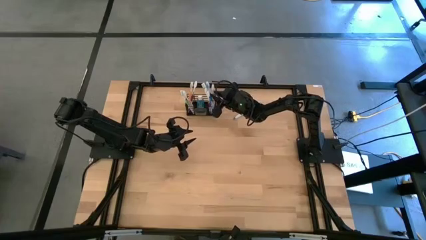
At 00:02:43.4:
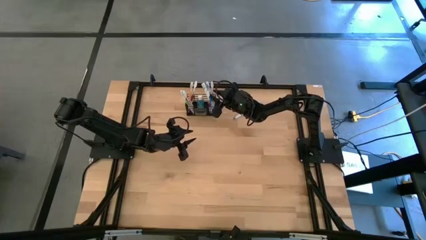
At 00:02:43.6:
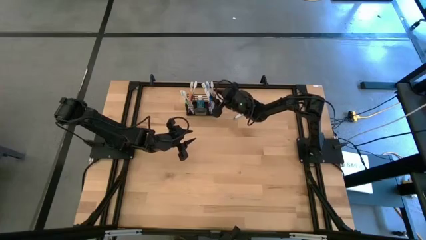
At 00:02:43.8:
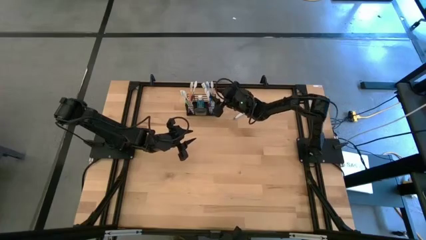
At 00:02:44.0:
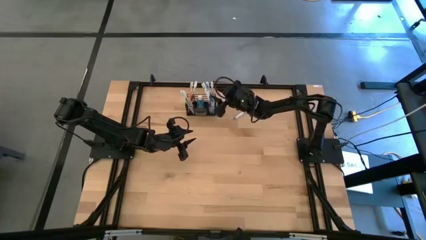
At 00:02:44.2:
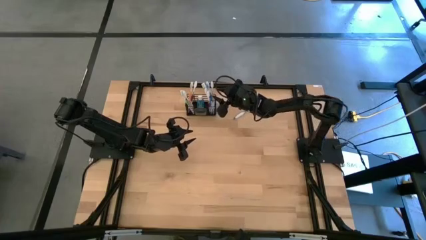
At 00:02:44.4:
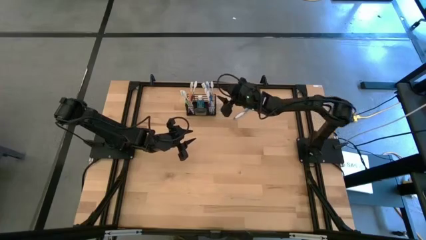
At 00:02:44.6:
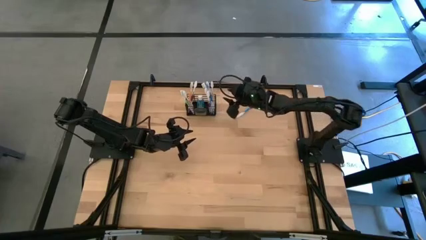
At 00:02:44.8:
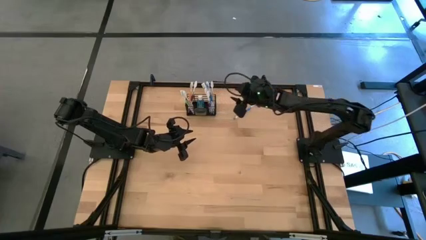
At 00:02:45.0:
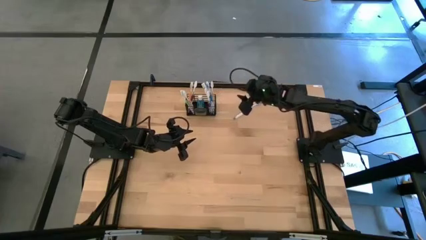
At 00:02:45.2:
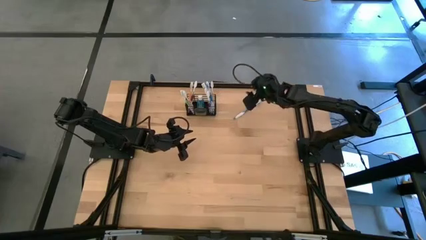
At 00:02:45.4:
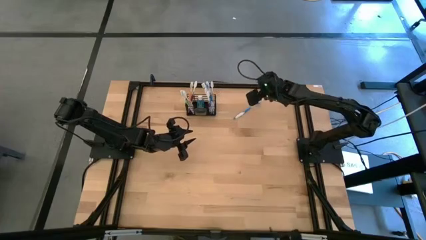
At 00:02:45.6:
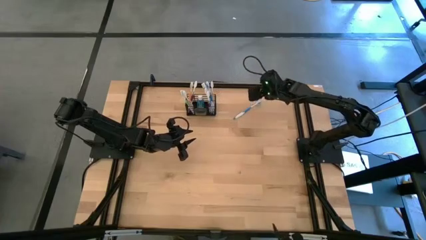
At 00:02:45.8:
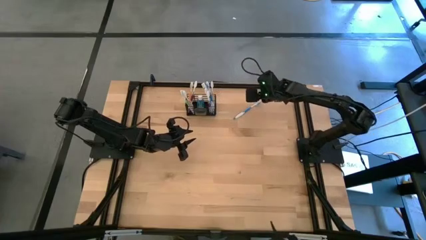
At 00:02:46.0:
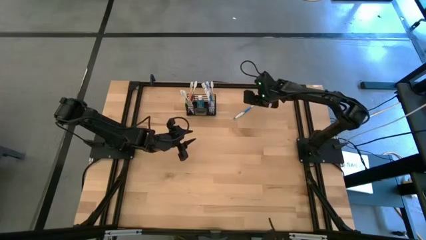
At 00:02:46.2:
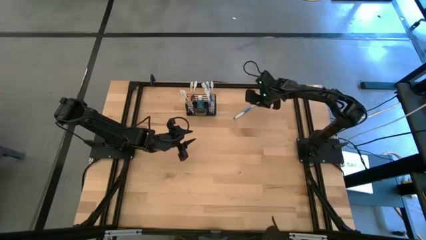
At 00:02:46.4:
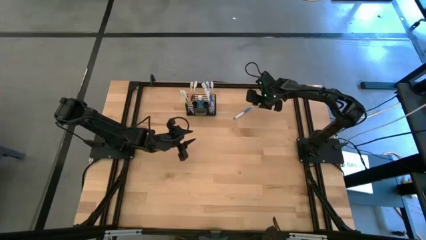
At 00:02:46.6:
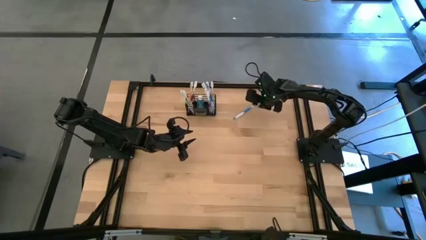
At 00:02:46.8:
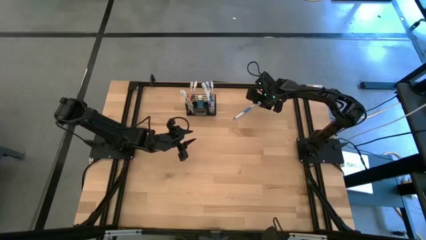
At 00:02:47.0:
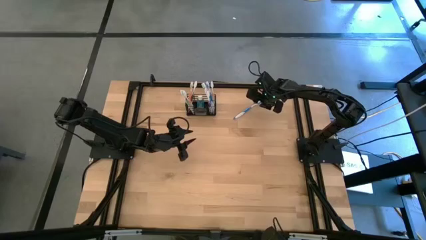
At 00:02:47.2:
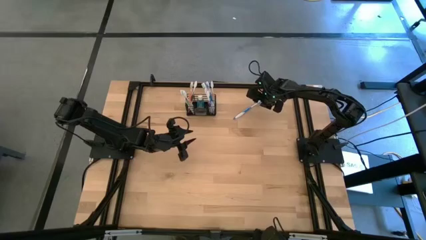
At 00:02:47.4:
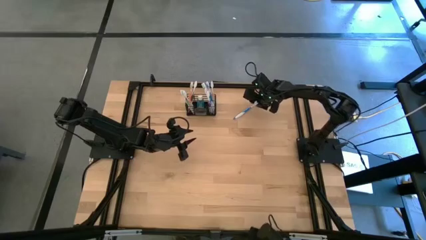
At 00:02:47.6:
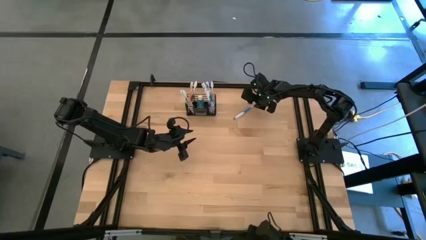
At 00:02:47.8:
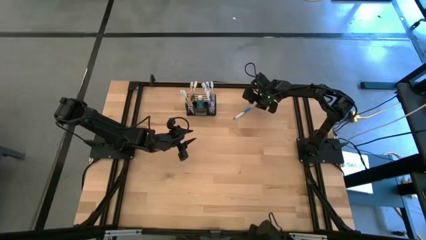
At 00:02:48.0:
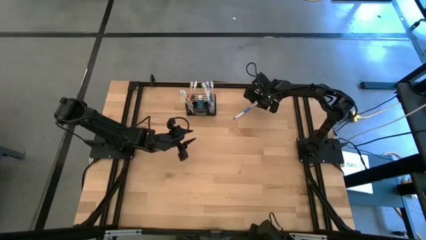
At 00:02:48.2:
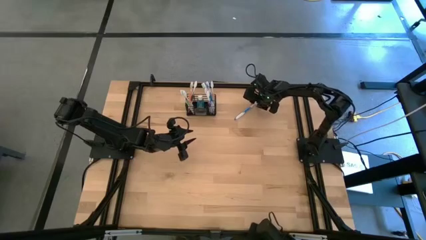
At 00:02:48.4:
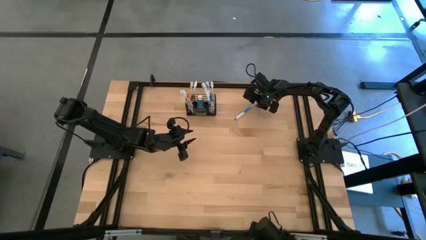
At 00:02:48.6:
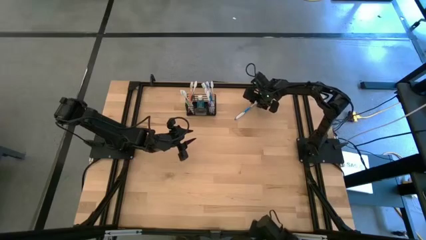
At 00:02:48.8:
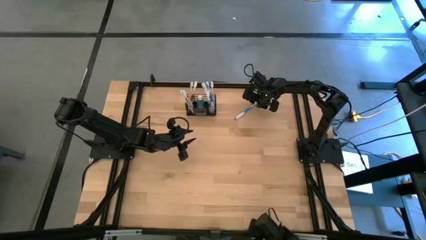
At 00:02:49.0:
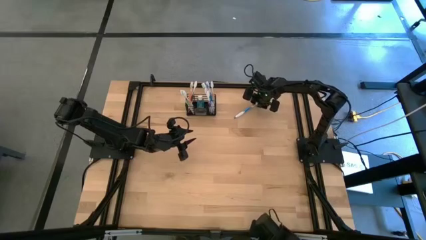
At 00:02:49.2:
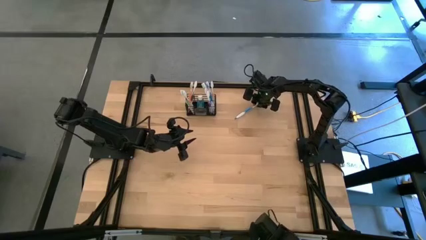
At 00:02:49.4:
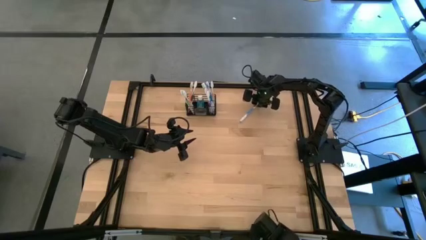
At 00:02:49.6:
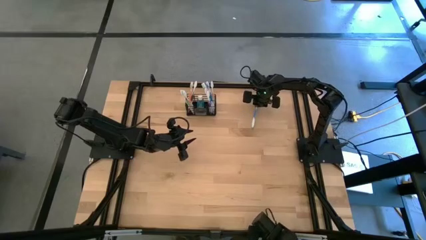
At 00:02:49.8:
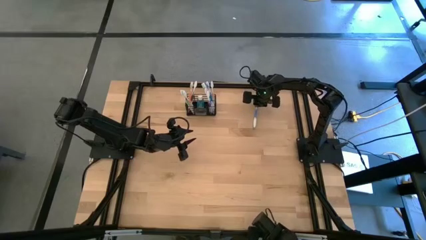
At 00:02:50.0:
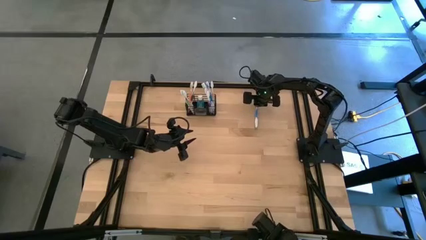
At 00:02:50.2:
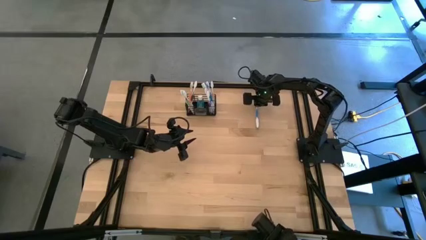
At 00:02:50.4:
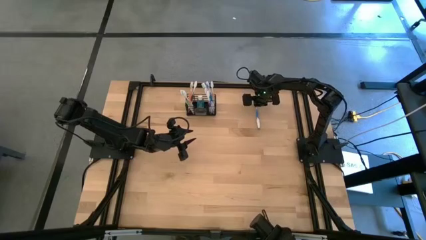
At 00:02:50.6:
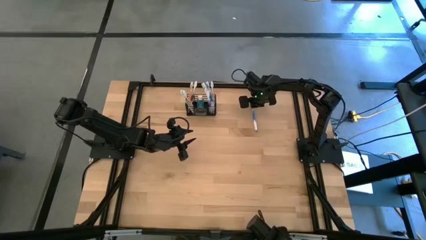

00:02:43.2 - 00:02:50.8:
Task: Pick & Place toothbrushing station
Put the blue toothbrush into the black wire organizer

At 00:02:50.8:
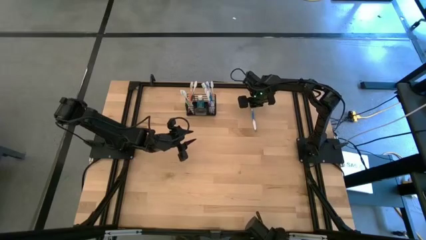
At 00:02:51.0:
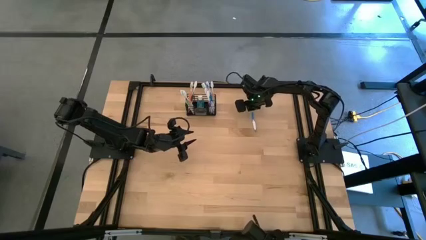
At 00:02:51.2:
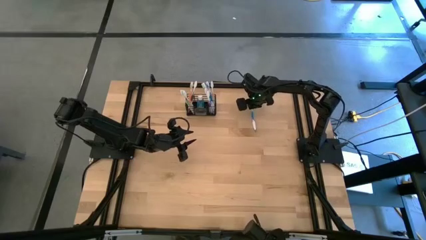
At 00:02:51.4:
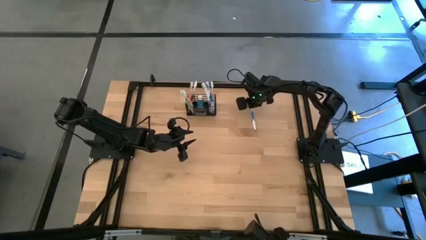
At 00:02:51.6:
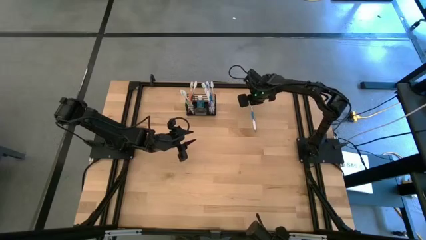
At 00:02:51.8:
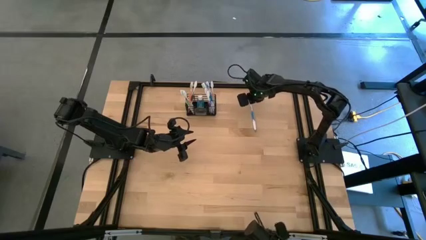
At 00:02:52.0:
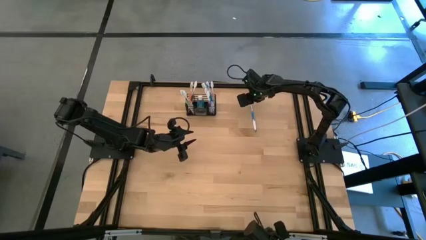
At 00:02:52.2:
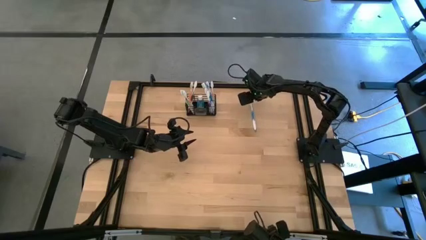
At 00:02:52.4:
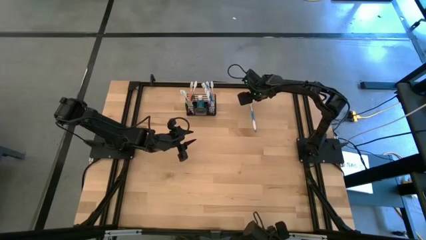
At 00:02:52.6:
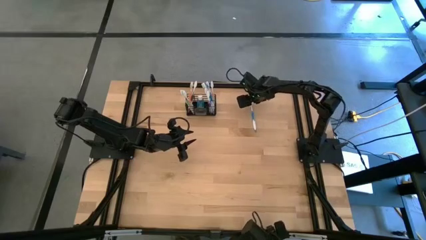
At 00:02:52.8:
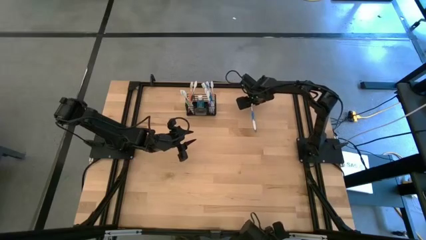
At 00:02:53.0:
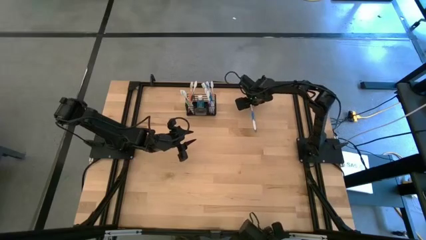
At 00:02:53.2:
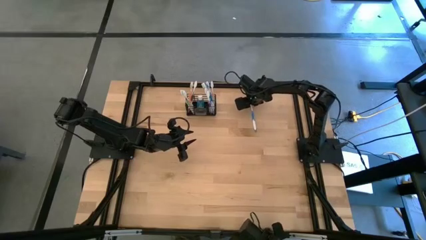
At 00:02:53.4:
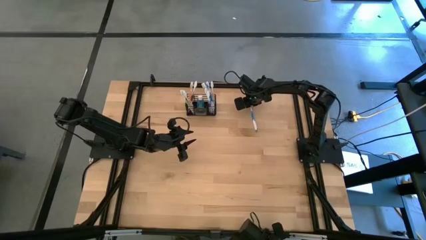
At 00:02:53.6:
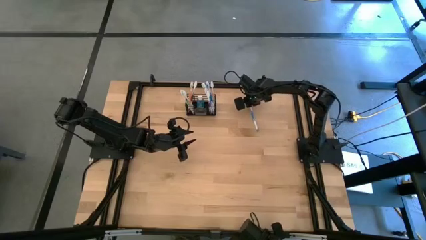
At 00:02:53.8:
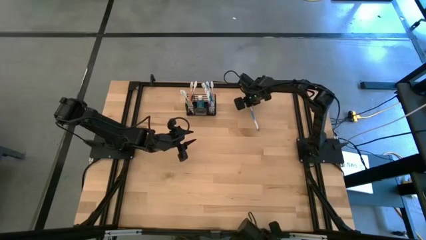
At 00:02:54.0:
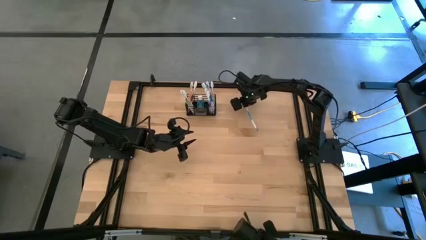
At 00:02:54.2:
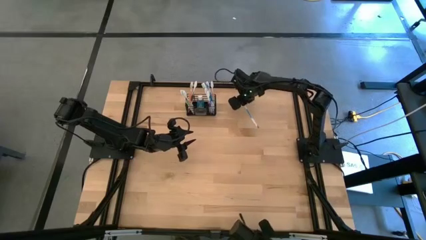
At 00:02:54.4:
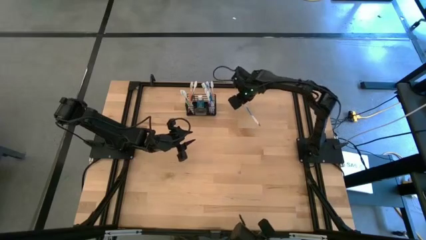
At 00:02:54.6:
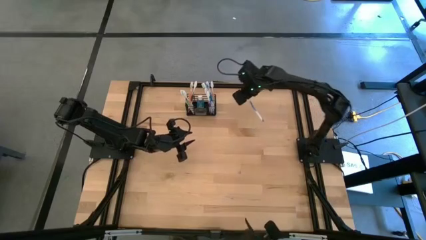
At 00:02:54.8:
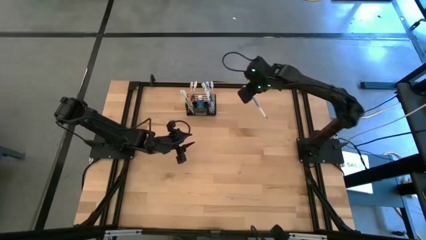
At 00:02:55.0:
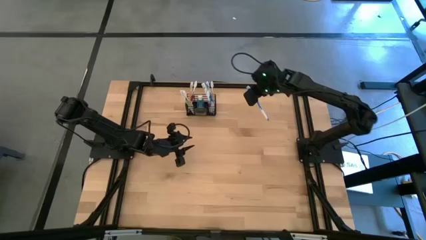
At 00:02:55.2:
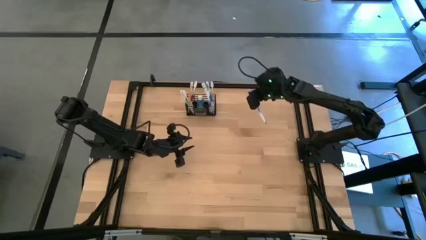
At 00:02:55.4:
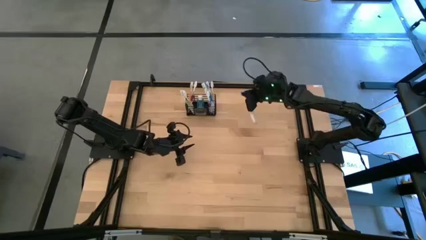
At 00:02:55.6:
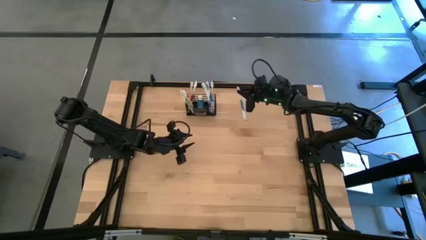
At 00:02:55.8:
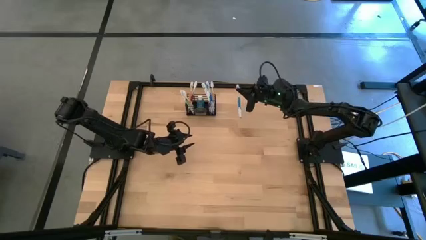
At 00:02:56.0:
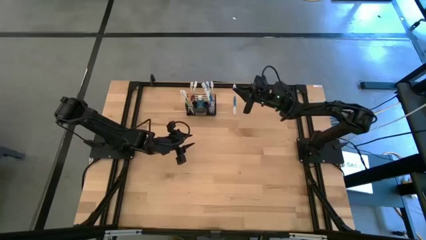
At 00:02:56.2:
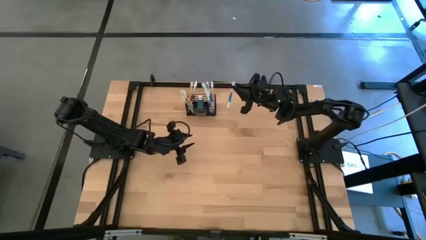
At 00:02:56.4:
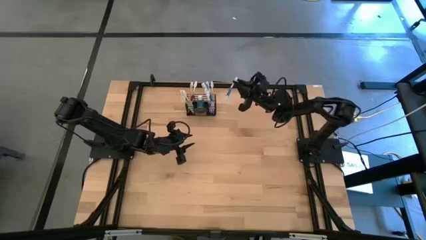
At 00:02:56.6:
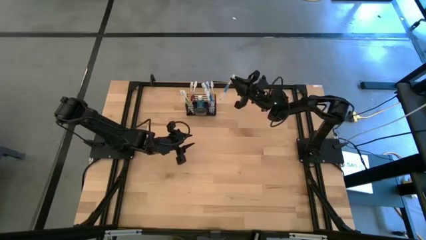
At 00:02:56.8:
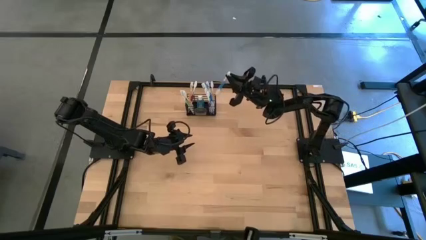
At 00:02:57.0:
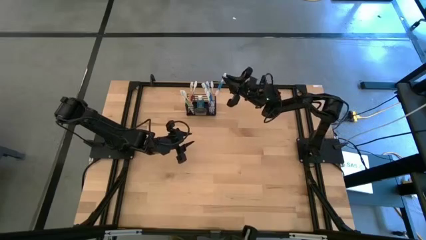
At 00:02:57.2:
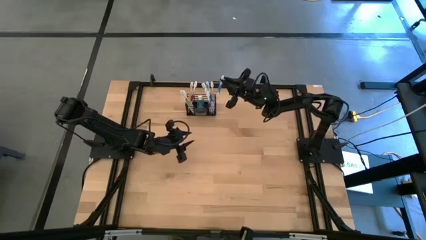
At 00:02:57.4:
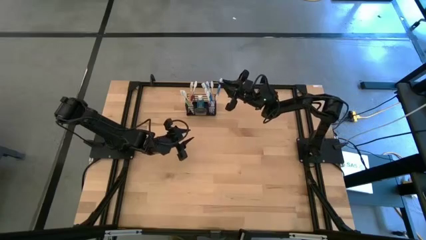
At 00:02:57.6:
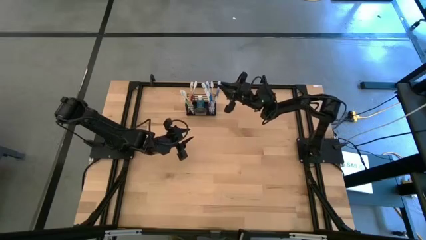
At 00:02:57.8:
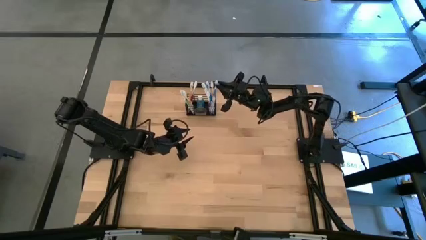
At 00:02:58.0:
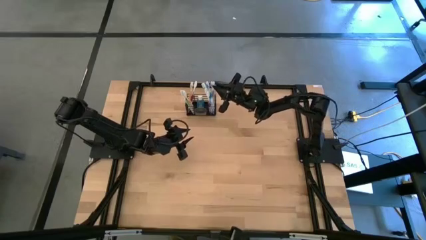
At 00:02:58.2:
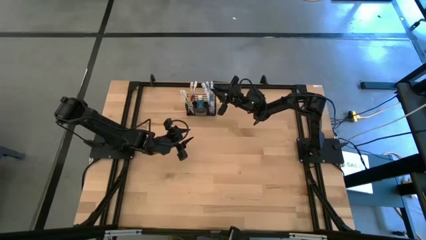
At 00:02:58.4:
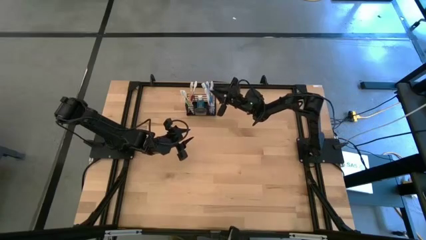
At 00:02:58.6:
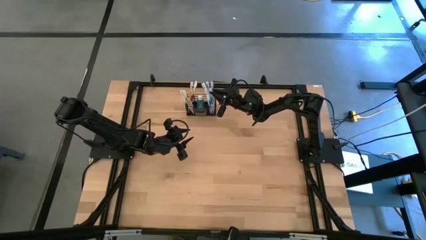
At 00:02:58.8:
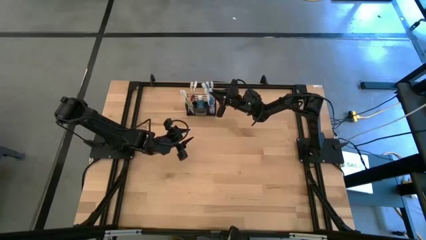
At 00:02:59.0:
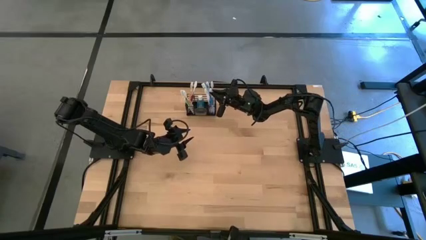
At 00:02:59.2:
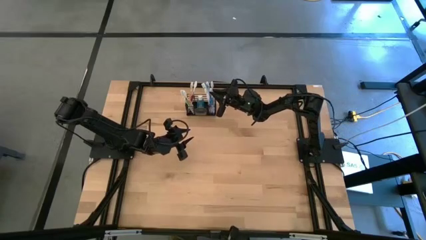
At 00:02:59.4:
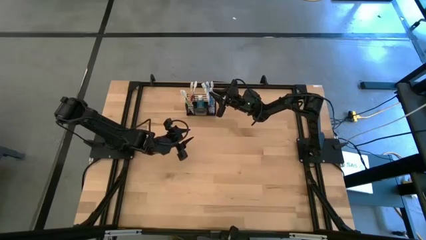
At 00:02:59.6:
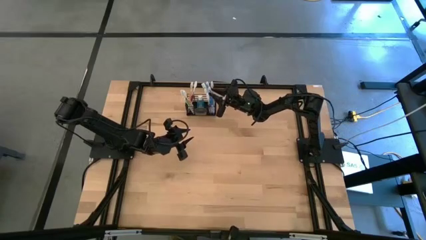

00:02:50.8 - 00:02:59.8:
Put the blue toothbrush into the black wire organizer
